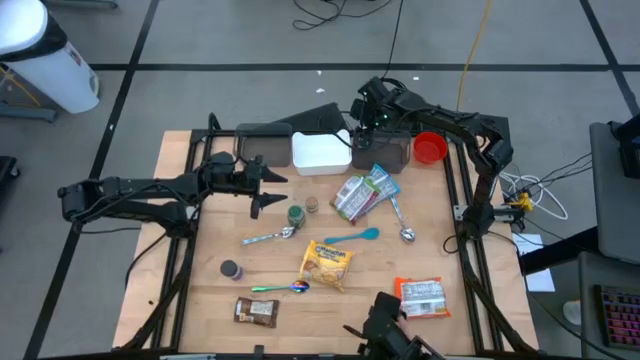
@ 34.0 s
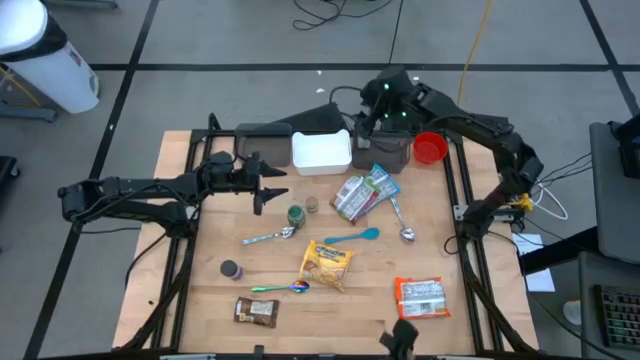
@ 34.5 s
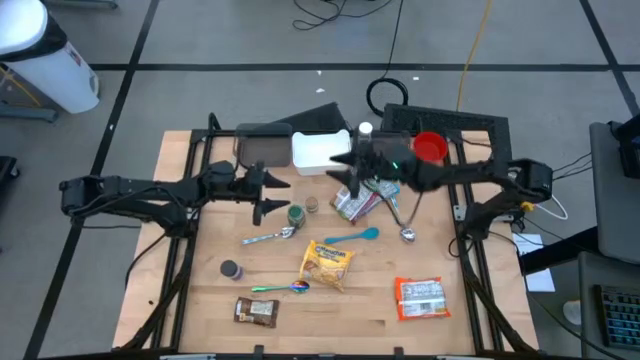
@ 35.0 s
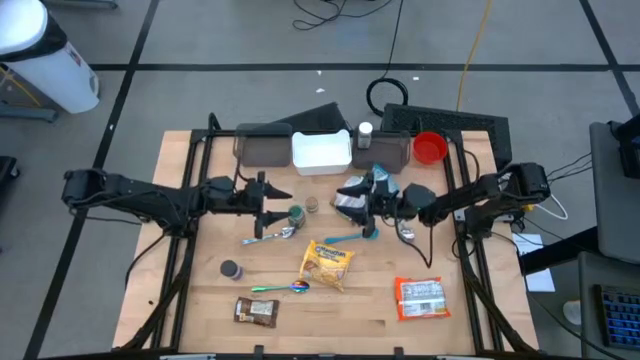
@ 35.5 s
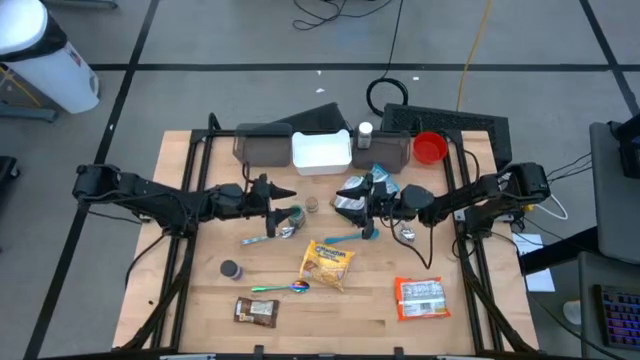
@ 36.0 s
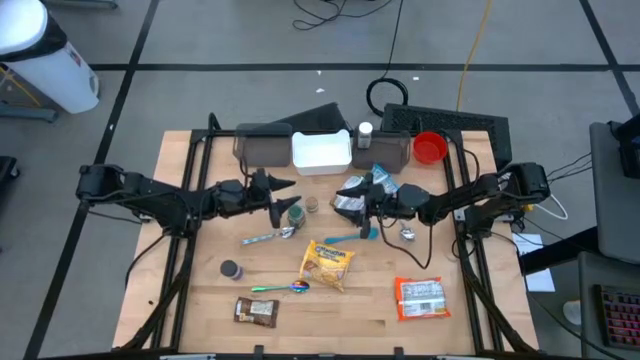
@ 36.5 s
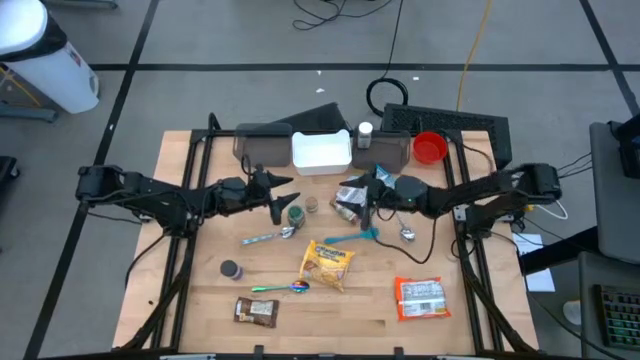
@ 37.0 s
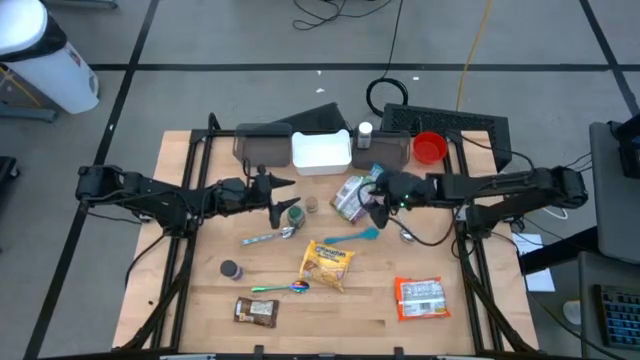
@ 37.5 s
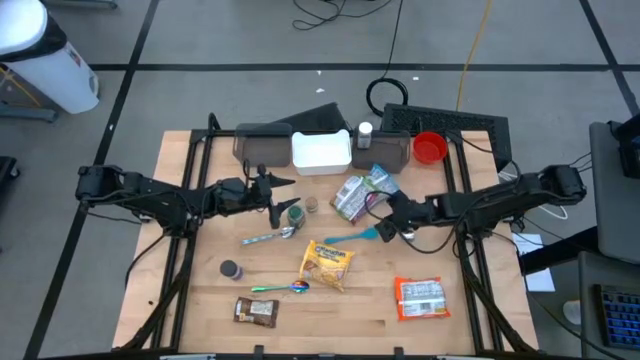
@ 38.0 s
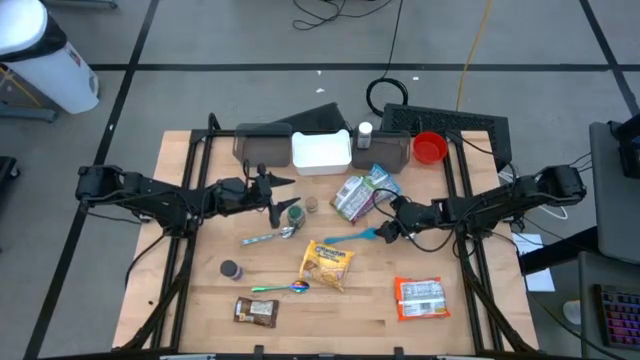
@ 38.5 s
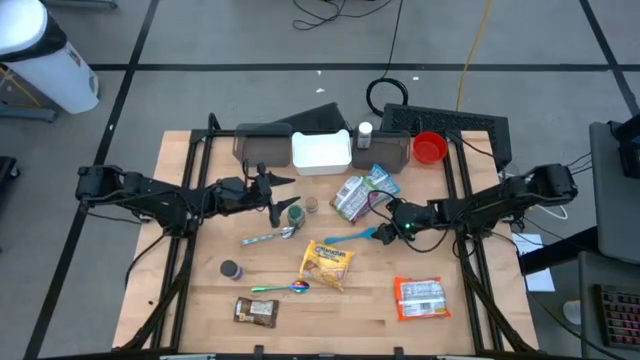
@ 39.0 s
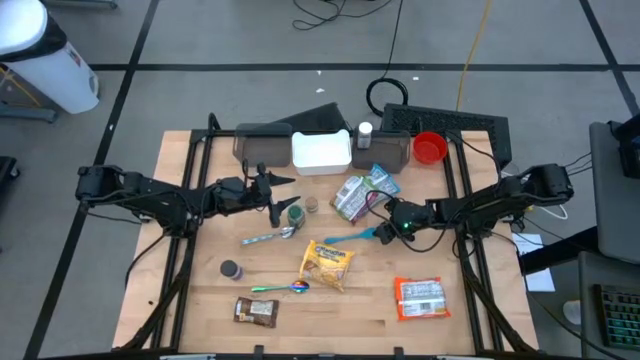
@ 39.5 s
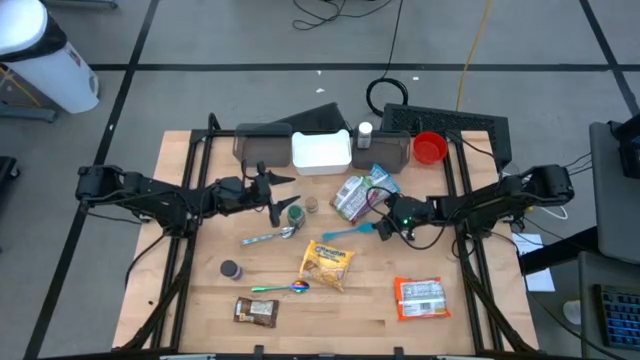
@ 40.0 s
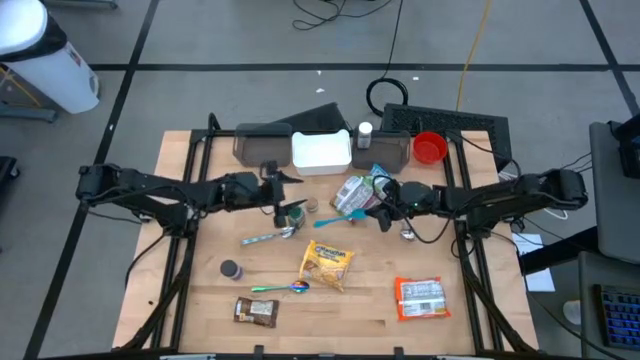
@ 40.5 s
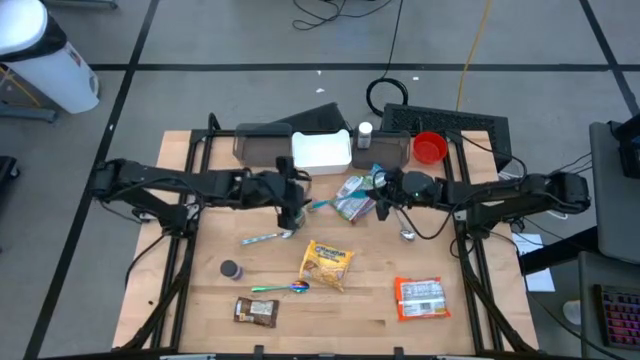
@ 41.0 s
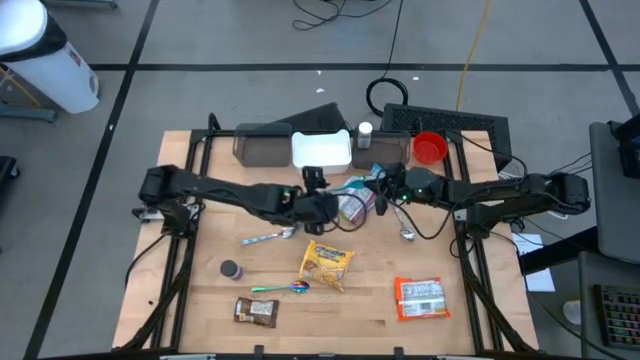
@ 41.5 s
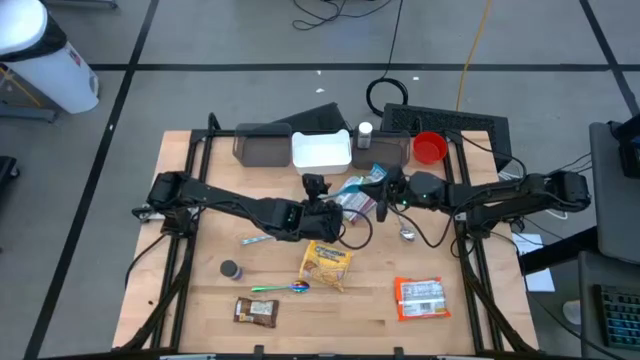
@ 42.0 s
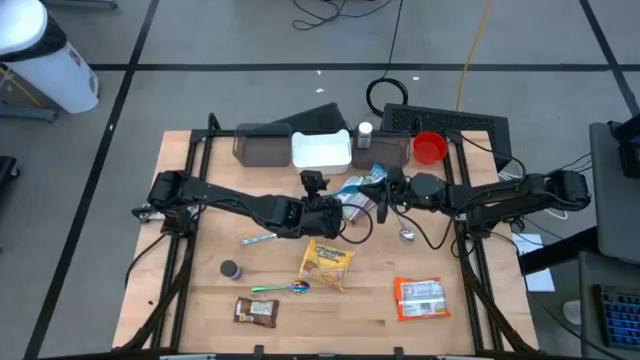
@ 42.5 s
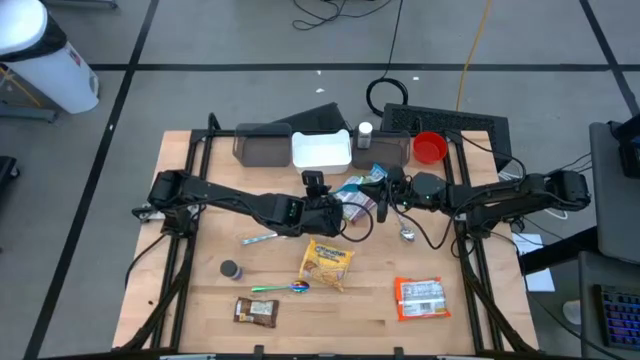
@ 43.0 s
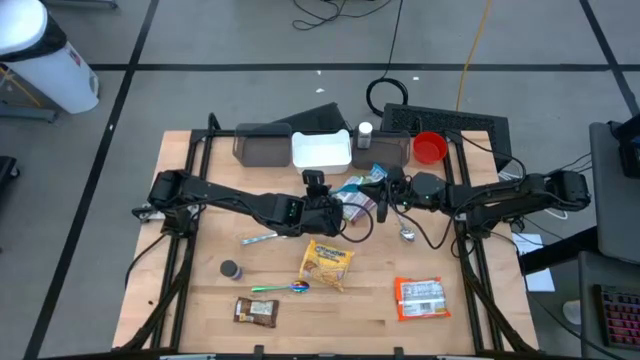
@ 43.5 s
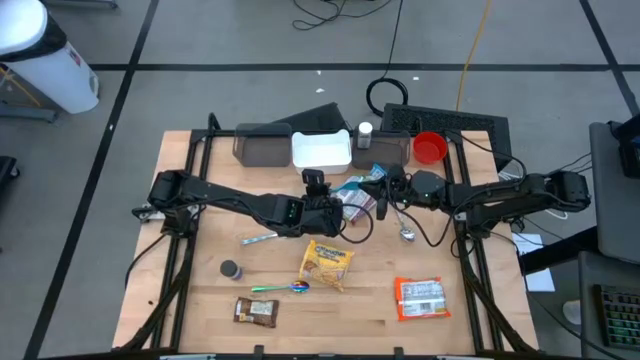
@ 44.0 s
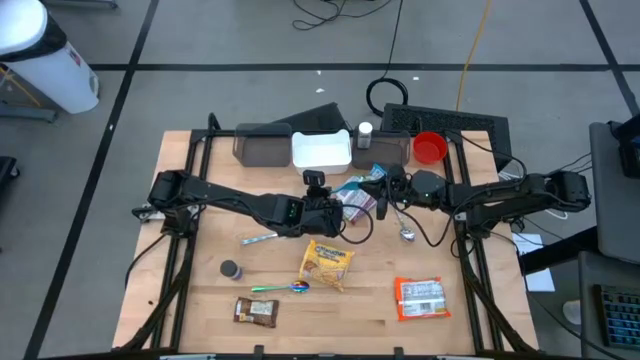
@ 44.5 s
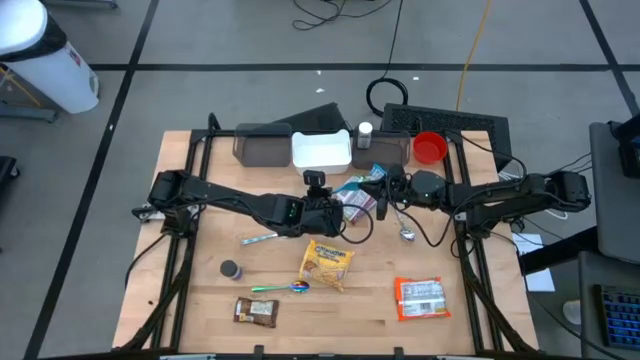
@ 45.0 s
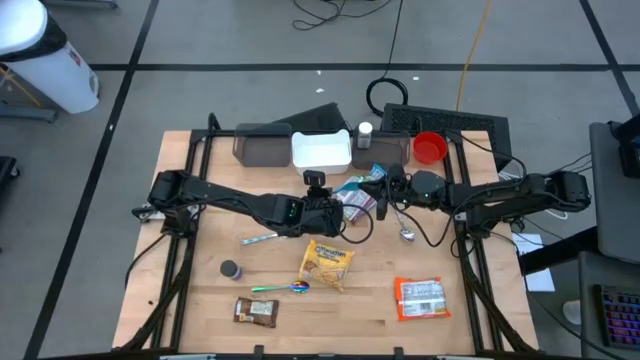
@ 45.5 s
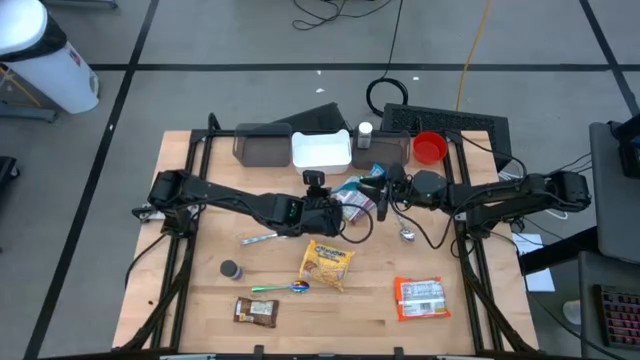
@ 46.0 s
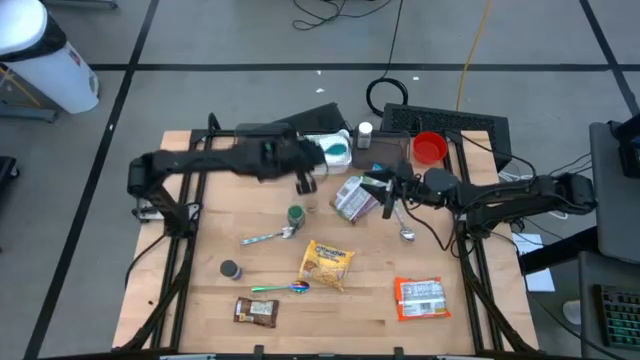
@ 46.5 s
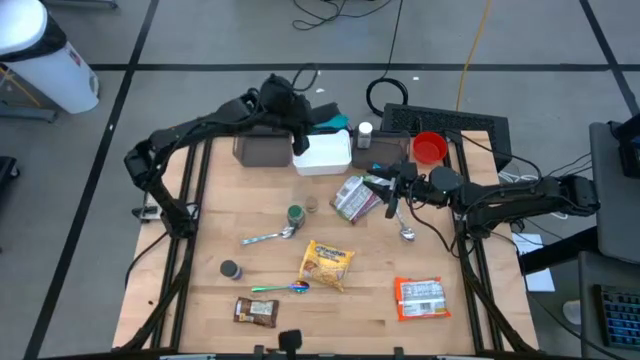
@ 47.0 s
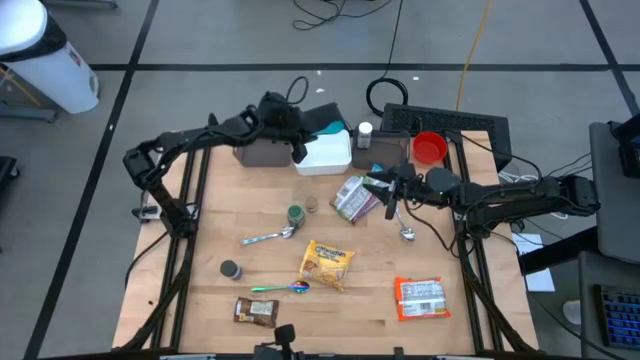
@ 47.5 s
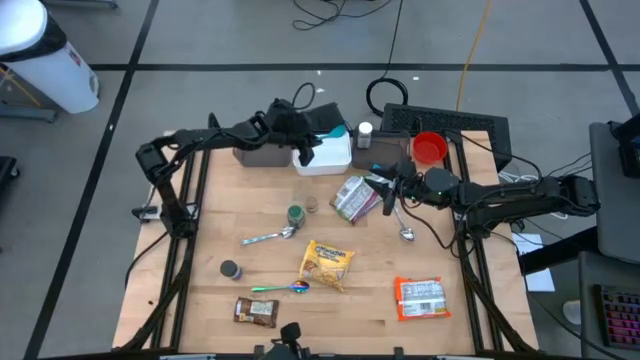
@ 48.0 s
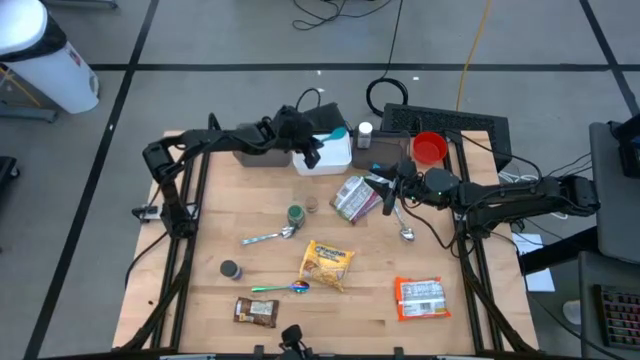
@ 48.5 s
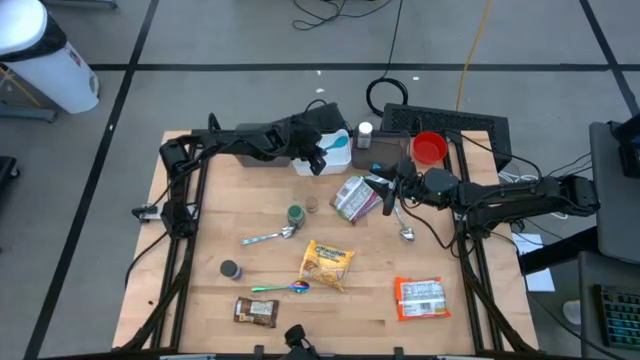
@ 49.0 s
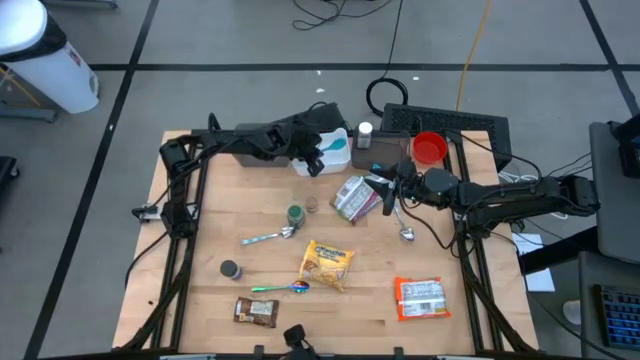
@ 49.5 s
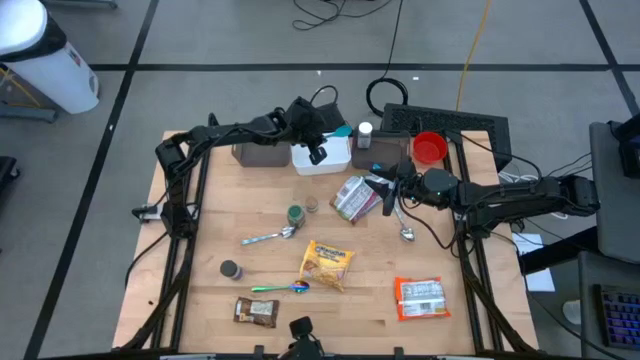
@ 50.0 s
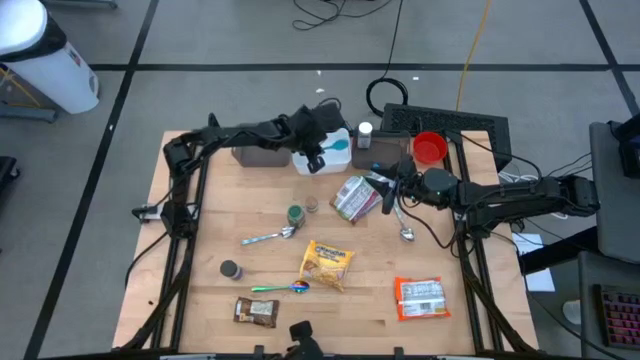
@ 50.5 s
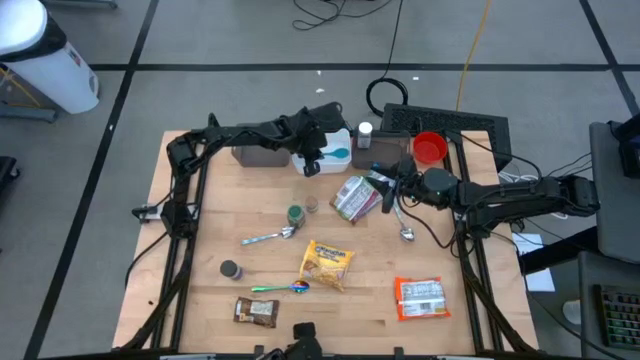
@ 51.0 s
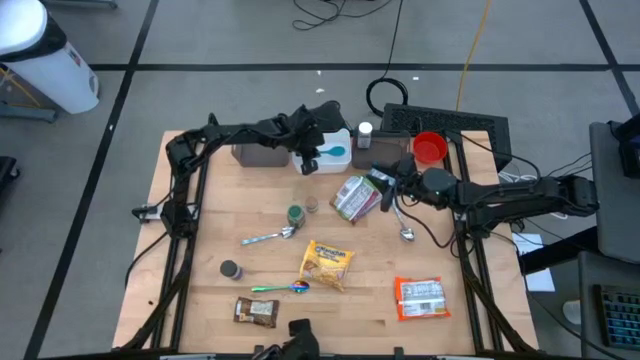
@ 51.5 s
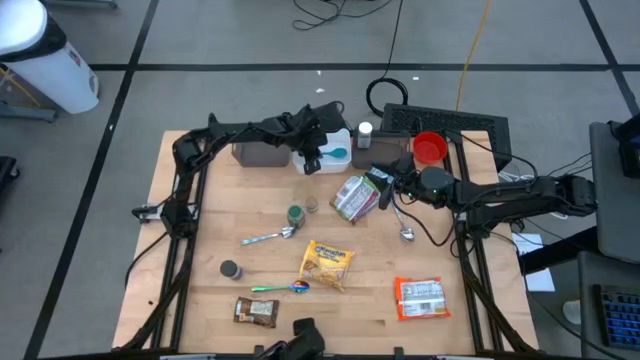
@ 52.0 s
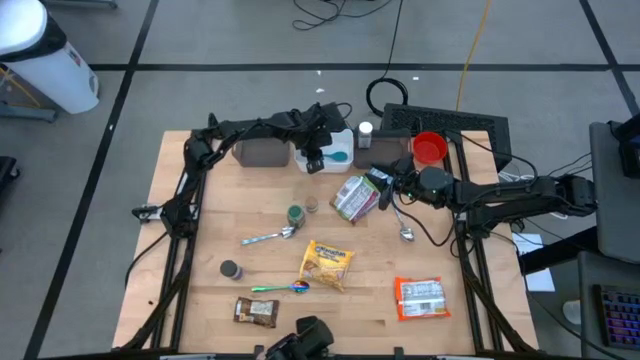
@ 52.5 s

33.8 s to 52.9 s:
Task: Pick & Place Food Item
Put the blue baby spoon into the white bin

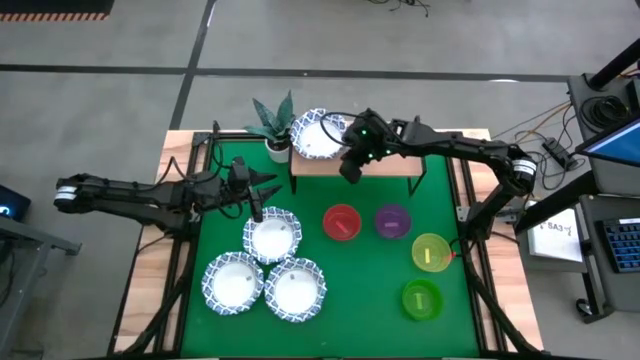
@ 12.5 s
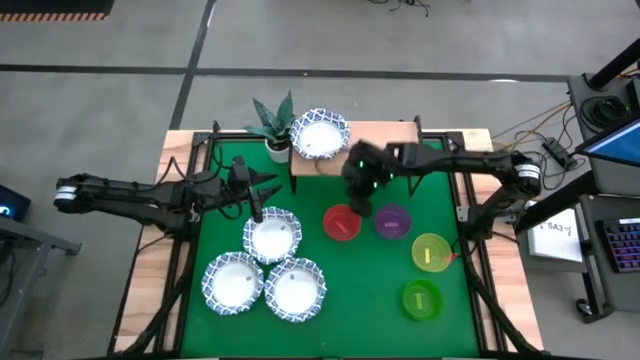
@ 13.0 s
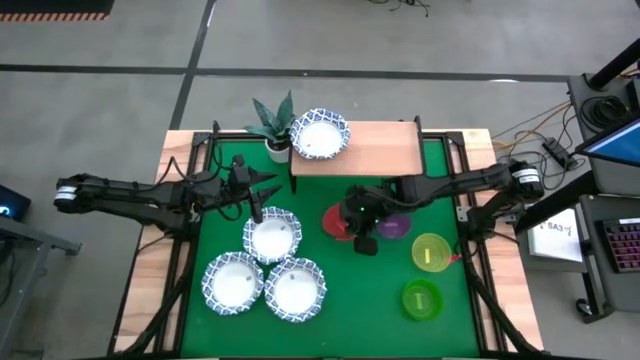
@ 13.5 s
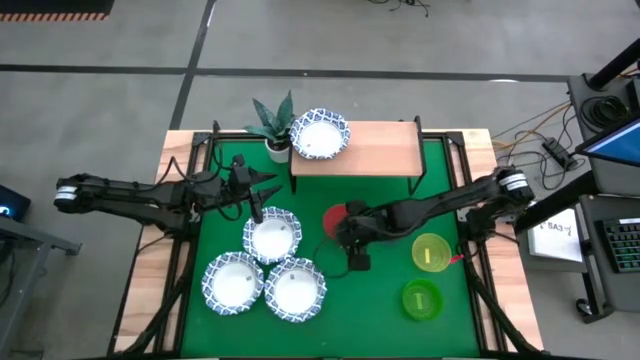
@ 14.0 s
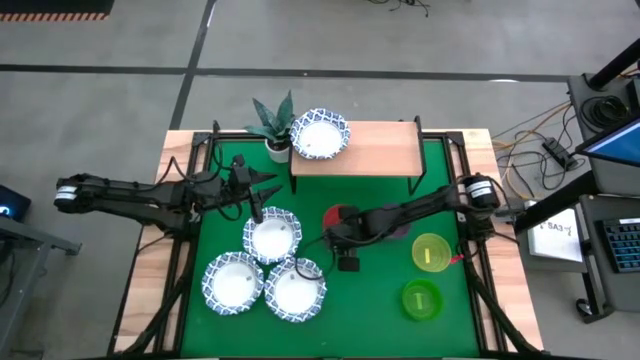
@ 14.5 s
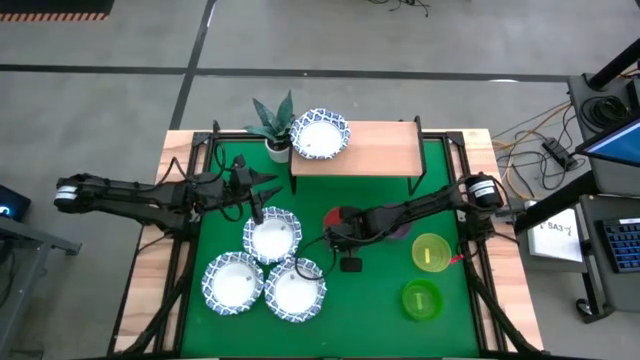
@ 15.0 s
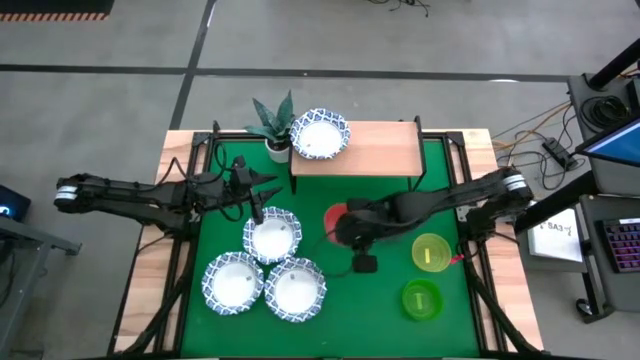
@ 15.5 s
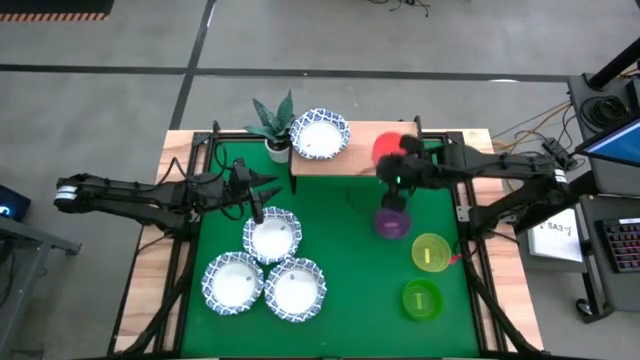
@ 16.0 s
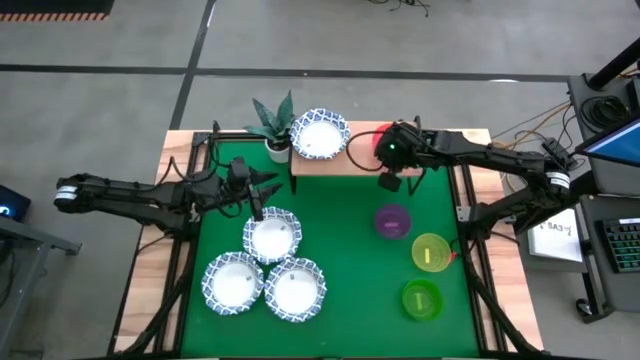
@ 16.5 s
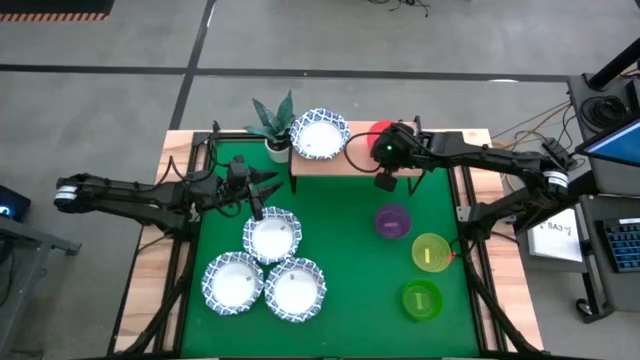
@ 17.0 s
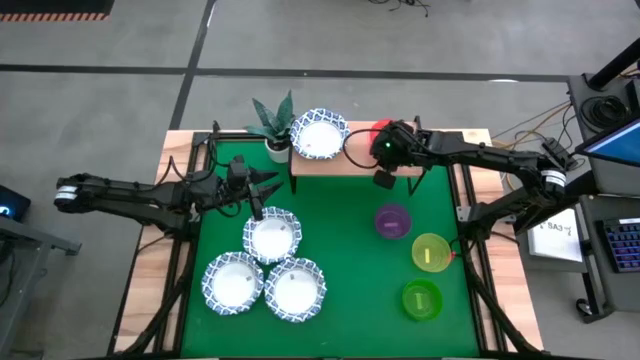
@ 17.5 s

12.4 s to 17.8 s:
Task: Place and stack bowls onto a shelf
Put the red bowl on the shelf
